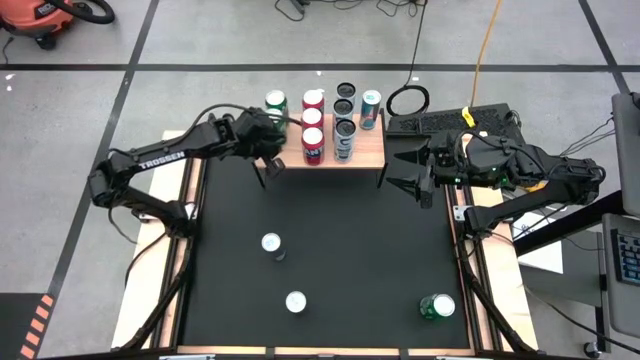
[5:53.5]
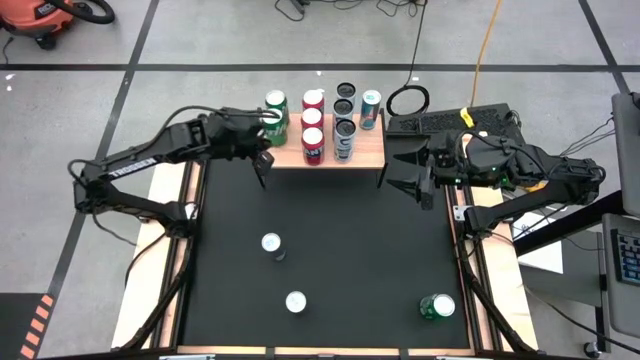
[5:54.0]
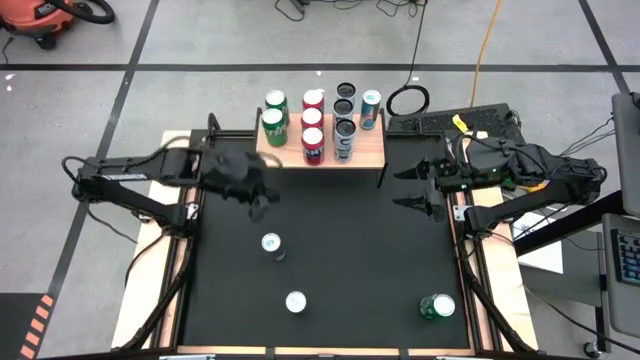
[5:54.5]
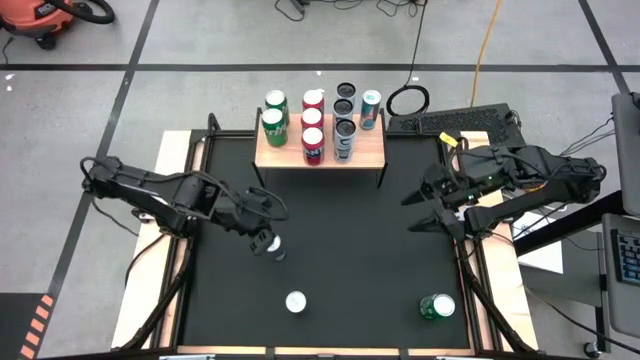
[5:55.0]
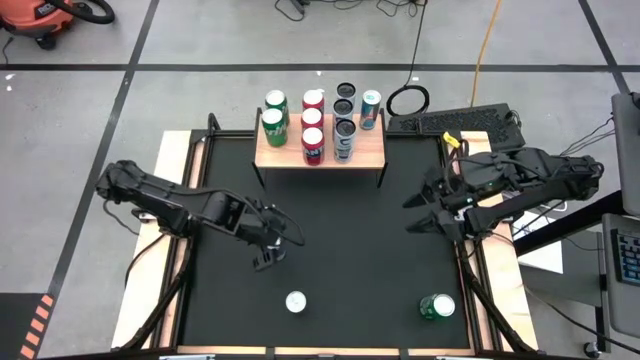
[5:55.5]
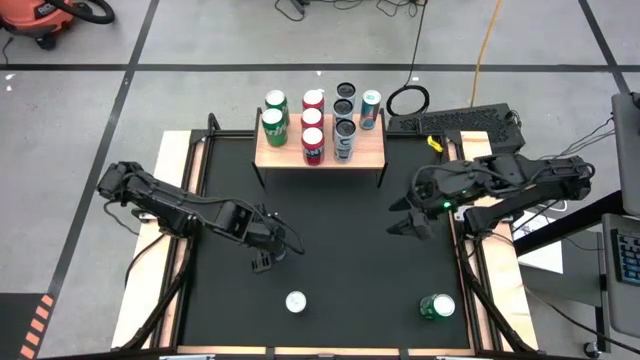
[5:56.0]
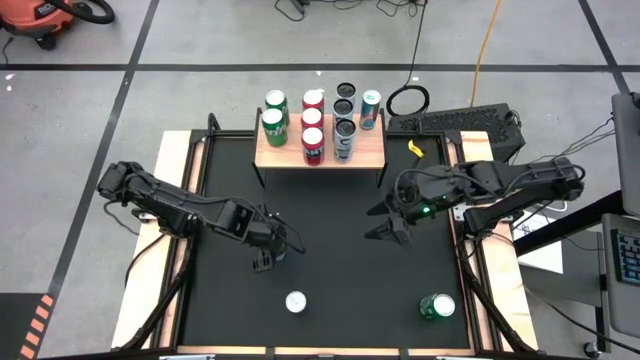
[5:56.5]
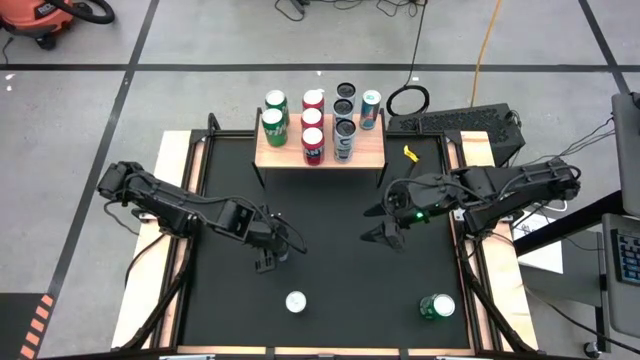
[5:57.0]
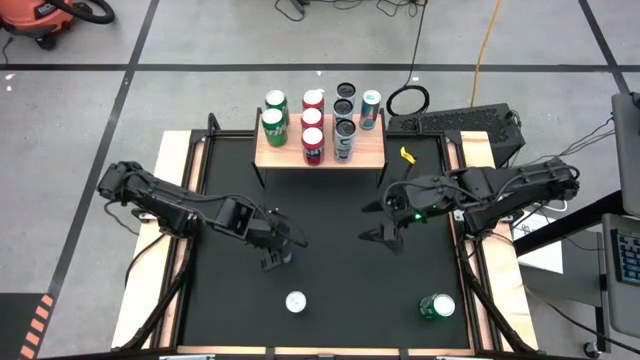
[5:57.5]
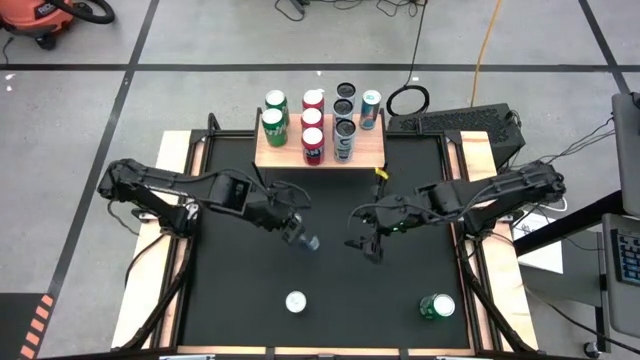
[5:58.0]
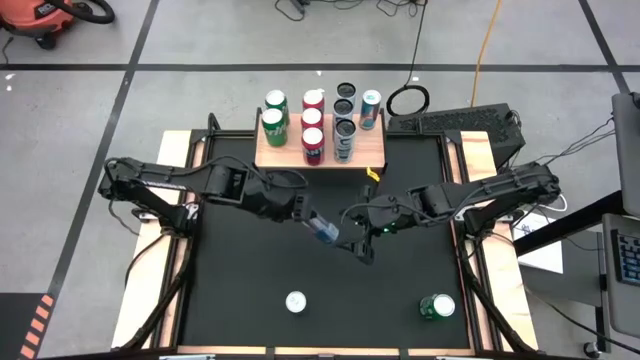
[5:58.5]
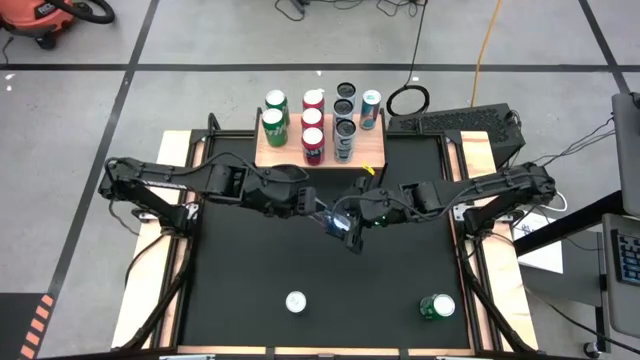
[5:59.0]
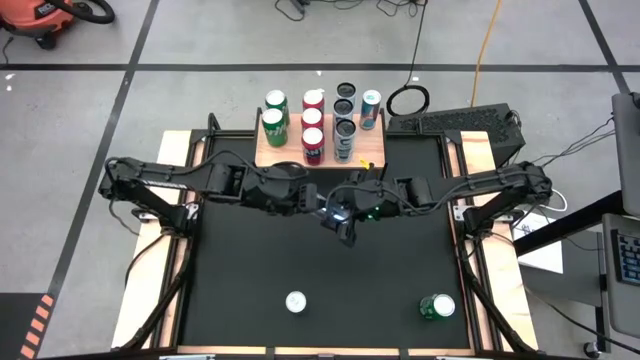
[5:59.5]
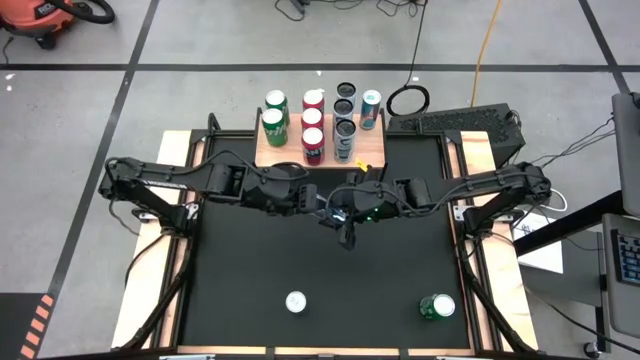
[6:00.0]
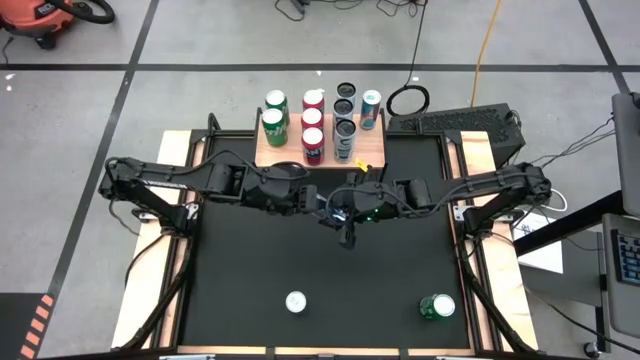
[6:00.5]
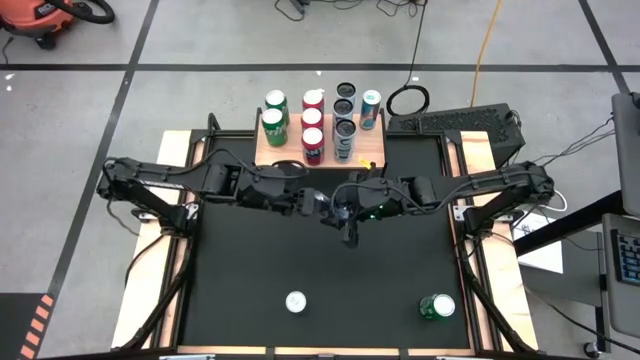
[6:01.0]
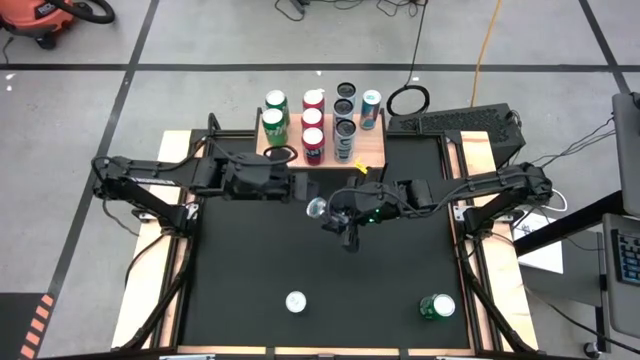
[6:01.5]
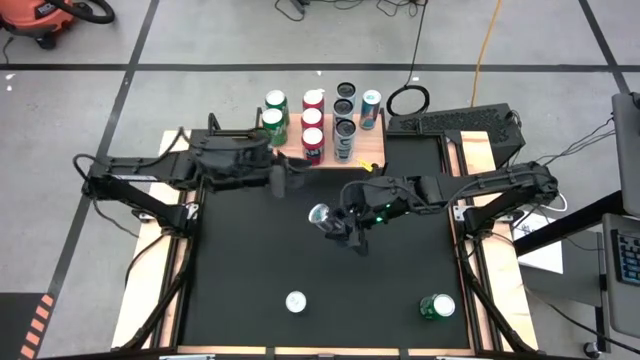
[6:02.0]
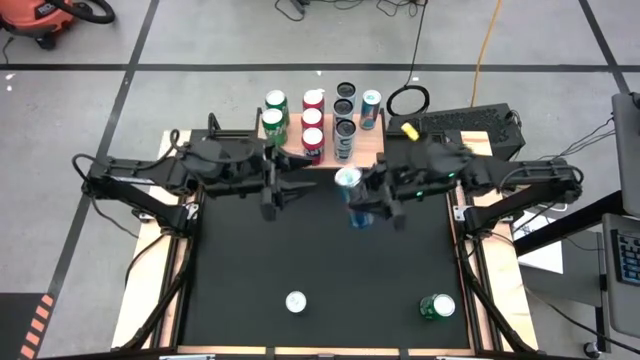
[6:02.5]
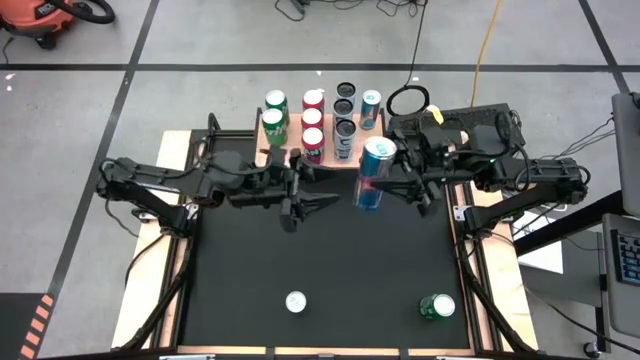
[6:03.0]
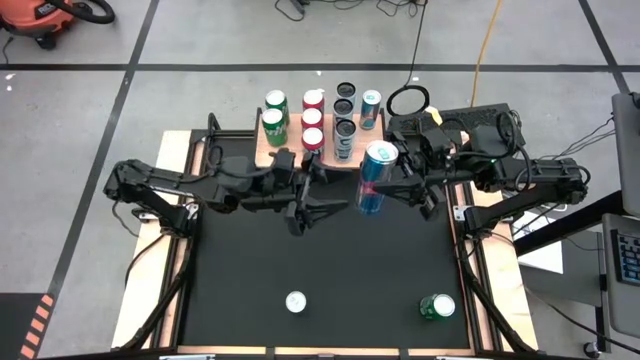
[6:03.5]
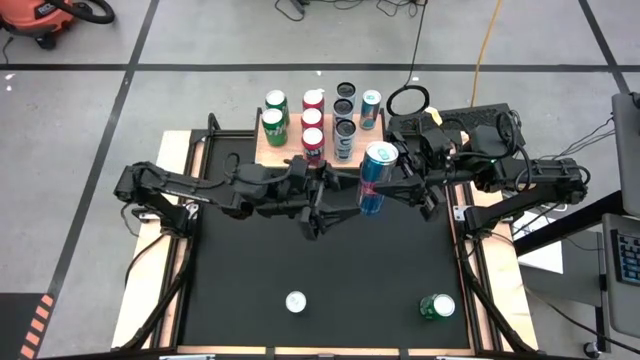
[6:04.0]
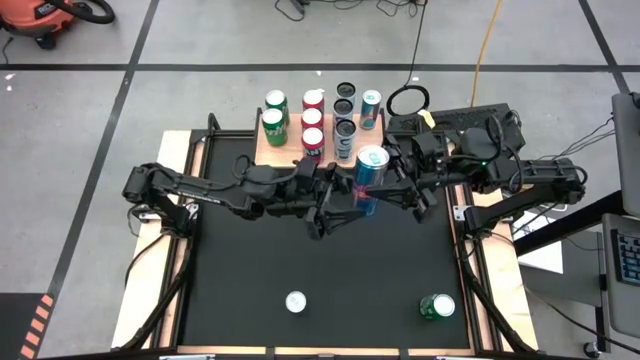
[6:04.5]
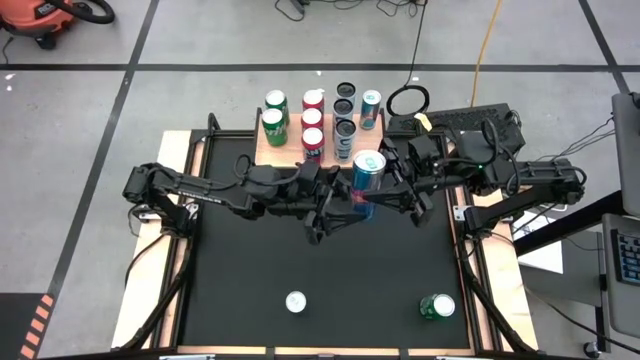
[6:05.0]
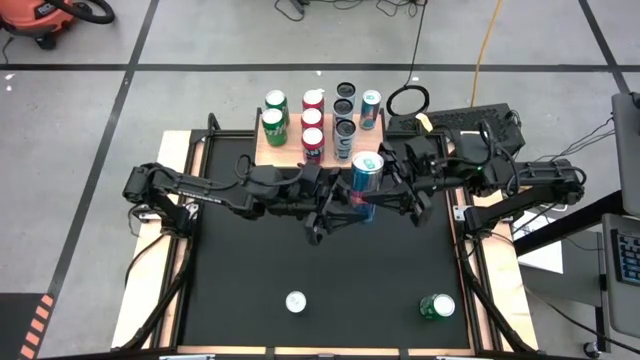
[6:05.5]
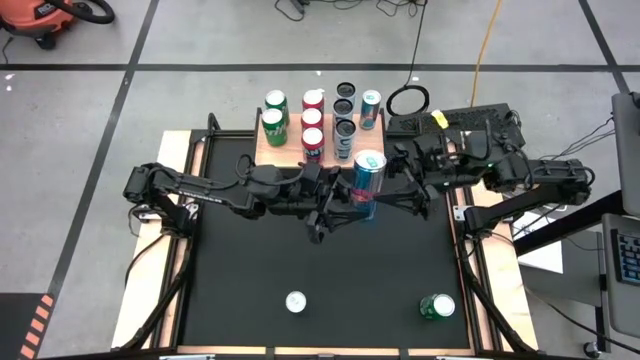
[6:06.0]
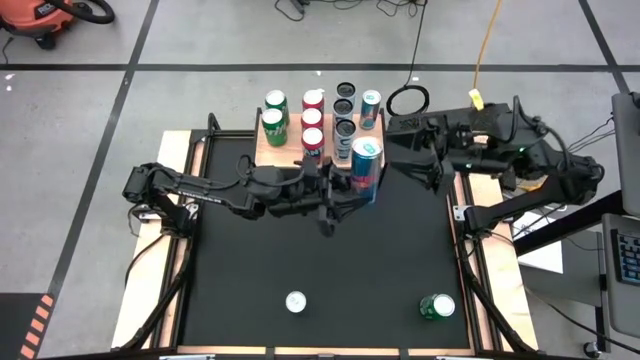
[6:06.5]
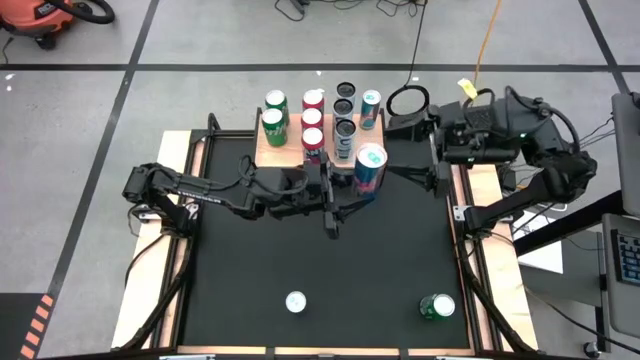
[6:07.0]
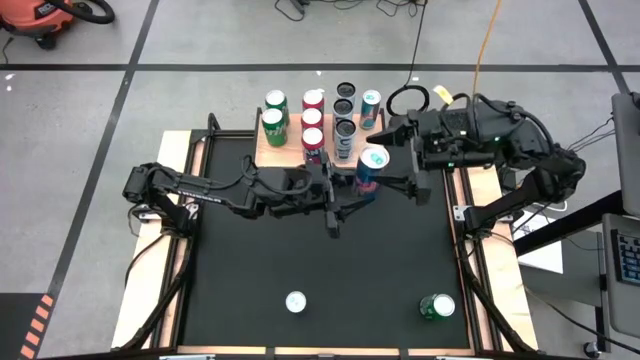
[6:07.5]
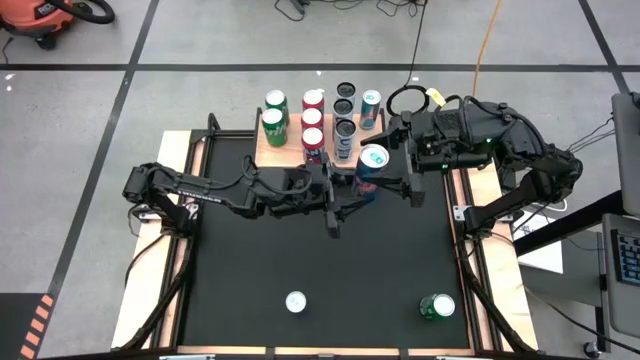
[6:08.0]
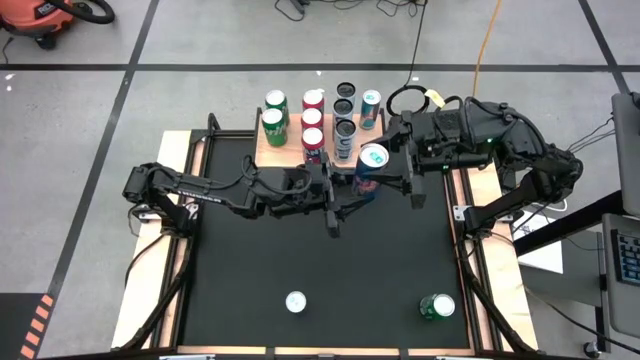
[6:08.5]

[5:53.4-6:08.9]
Task: Place canned beverage on shelf
Put the top blue soda can on the shelf aligned with the other blue soda can

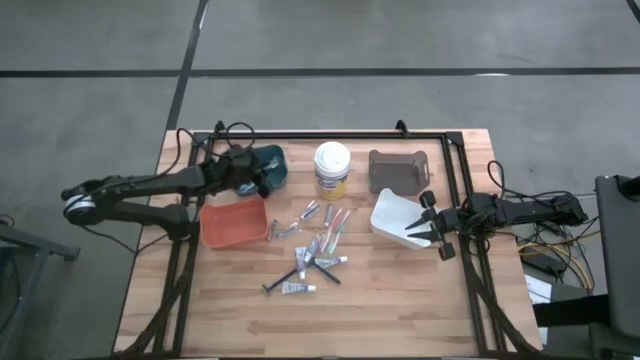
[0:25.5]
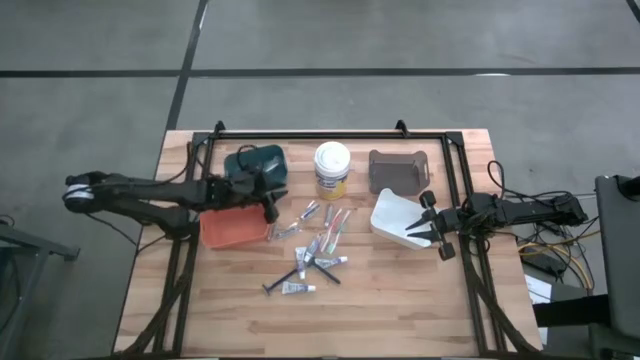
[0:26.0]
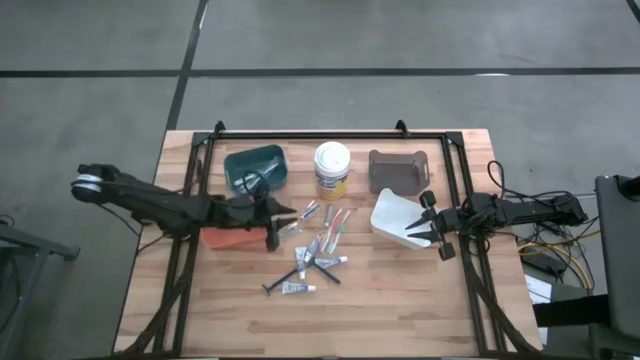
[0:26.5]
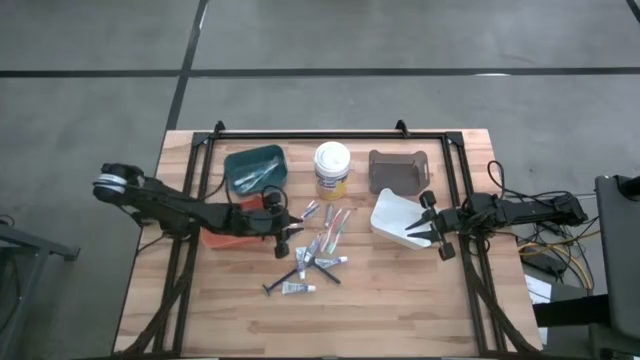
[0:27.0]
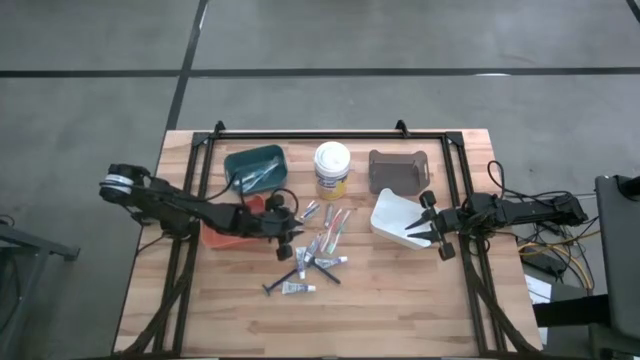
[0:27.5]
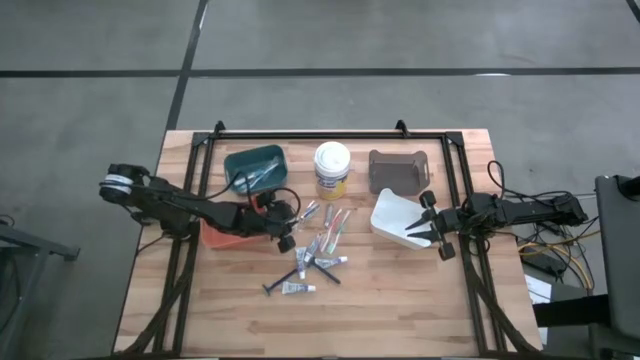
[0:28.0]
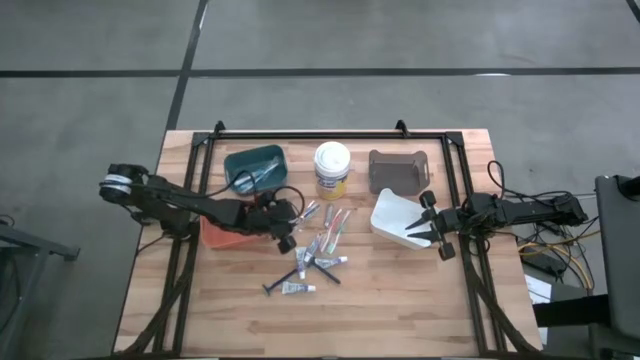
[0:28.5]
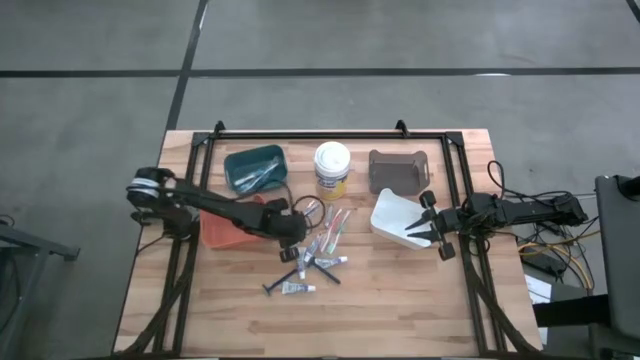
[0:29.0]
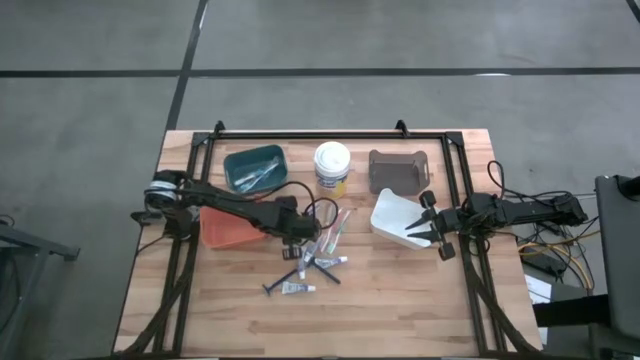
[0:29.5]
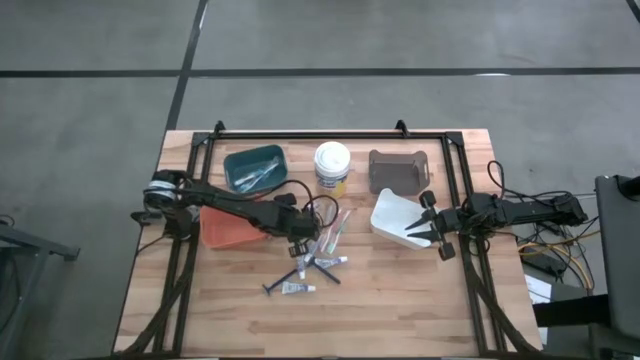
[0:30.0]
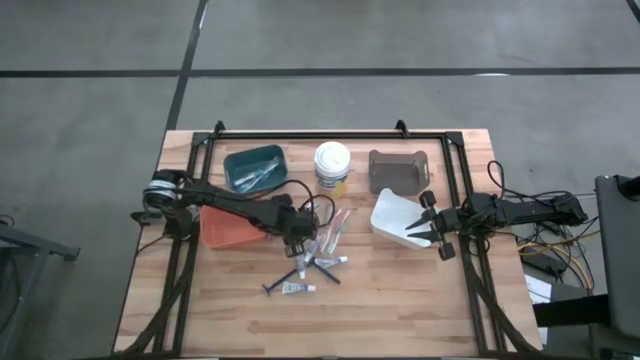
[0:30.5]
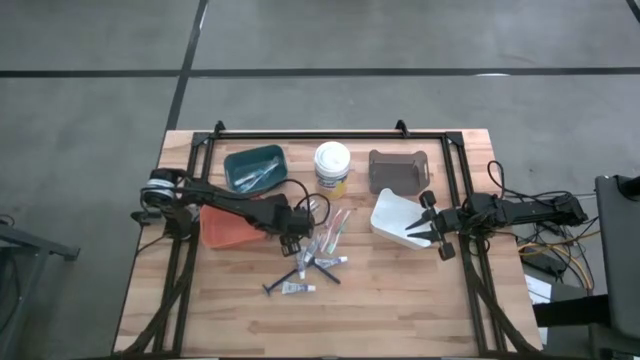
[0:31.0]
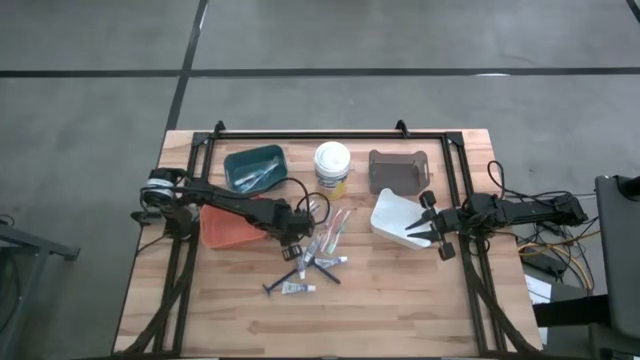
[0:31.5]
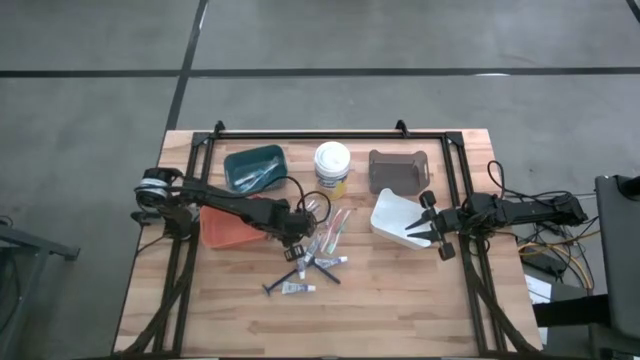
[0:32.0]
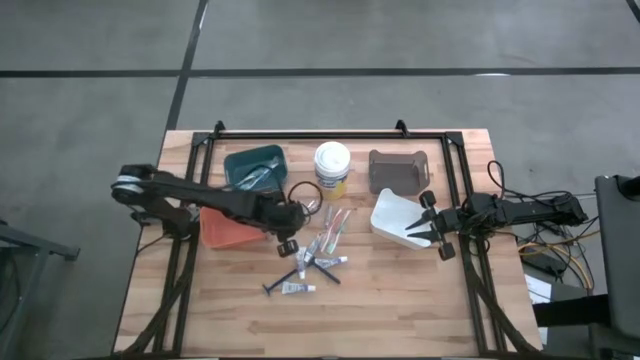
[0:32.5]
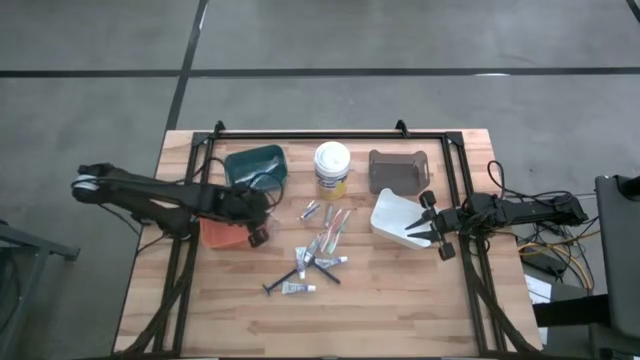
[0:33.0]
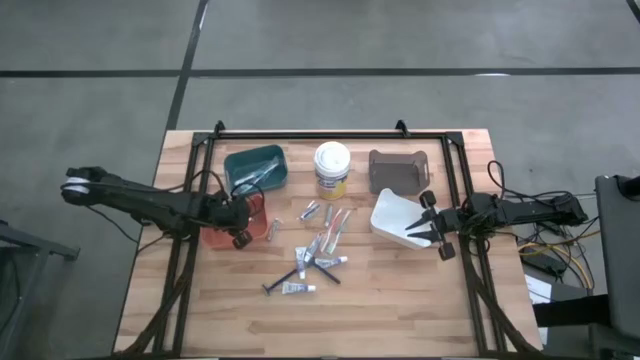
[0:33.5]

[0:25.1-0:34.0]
Task: Pick & Place Travel size toiletries
Put the nail cutter into the orange bin
